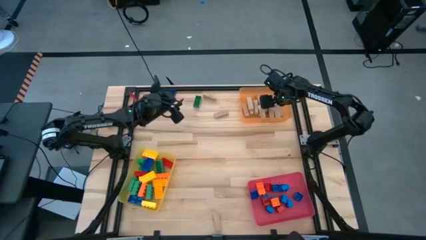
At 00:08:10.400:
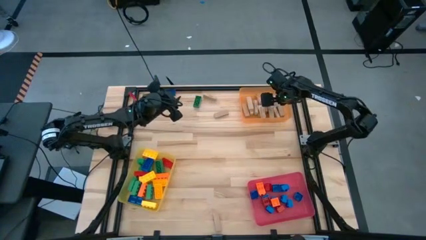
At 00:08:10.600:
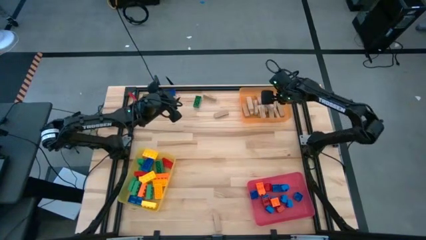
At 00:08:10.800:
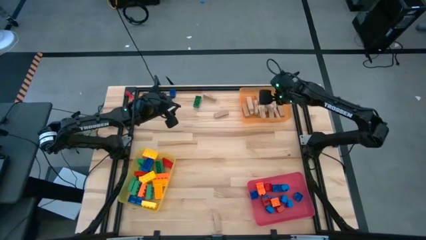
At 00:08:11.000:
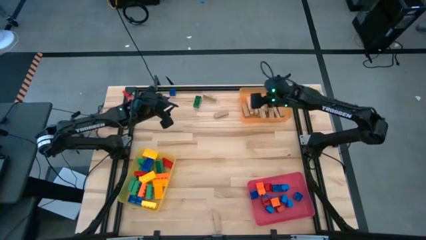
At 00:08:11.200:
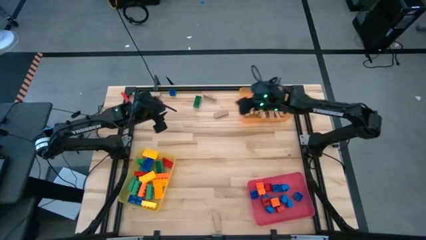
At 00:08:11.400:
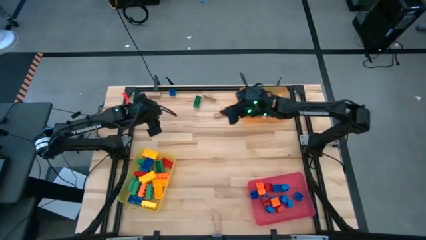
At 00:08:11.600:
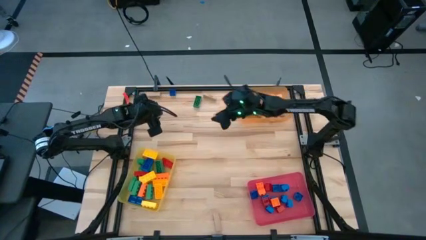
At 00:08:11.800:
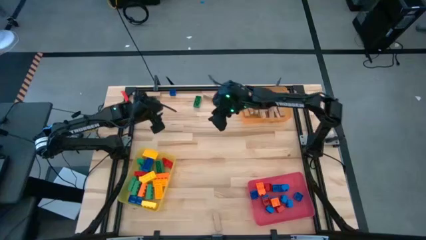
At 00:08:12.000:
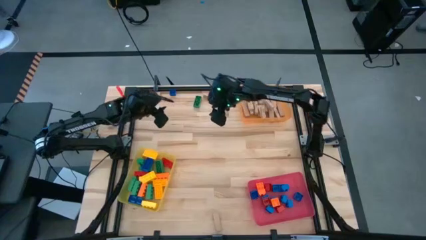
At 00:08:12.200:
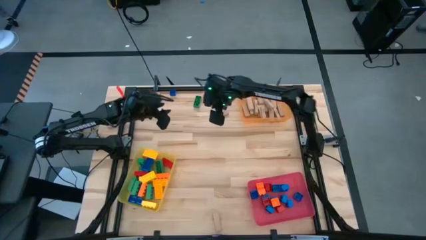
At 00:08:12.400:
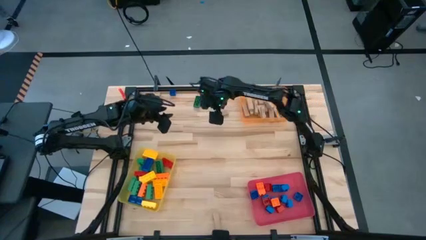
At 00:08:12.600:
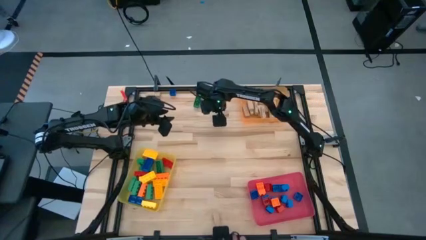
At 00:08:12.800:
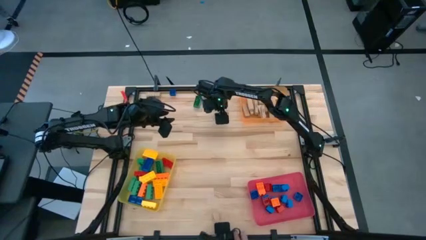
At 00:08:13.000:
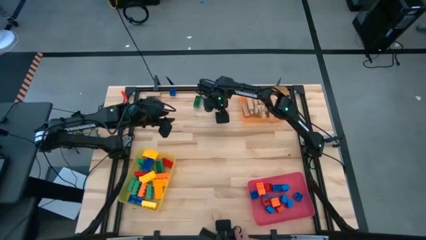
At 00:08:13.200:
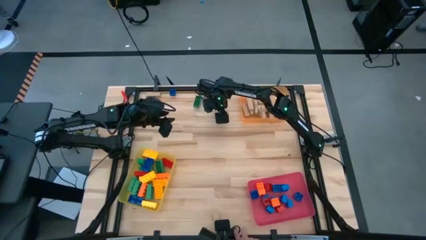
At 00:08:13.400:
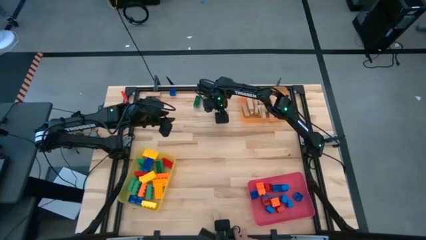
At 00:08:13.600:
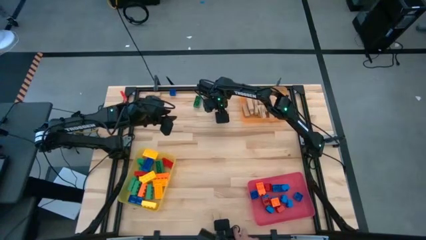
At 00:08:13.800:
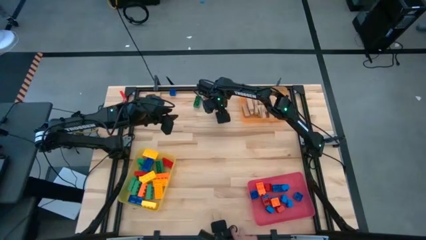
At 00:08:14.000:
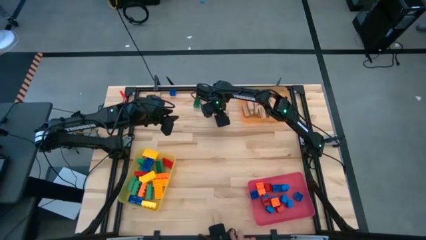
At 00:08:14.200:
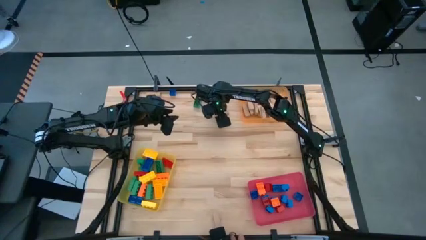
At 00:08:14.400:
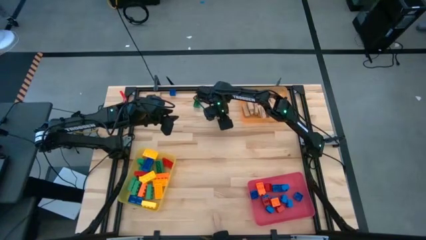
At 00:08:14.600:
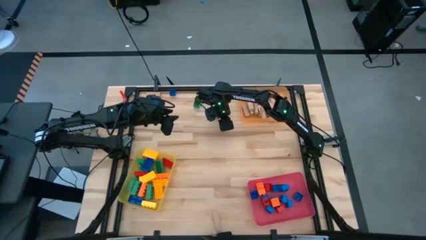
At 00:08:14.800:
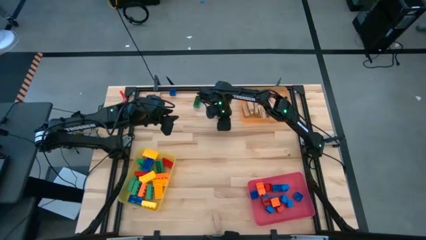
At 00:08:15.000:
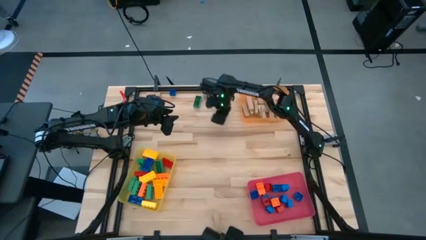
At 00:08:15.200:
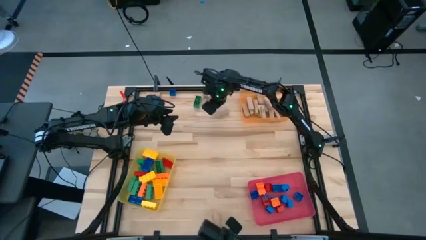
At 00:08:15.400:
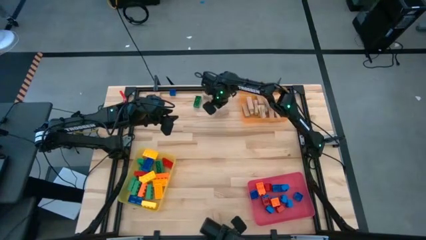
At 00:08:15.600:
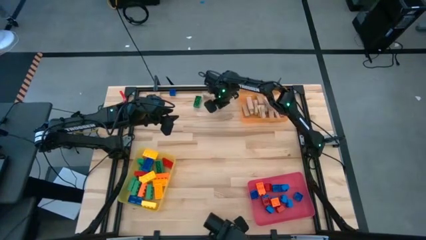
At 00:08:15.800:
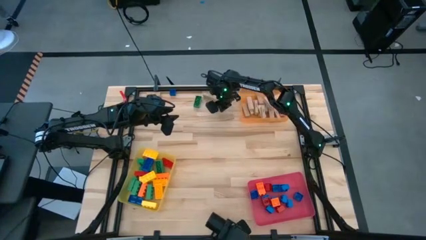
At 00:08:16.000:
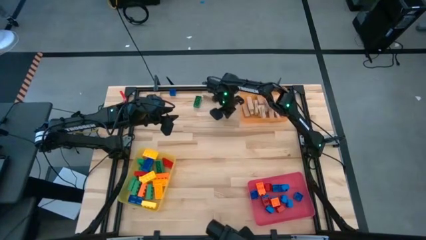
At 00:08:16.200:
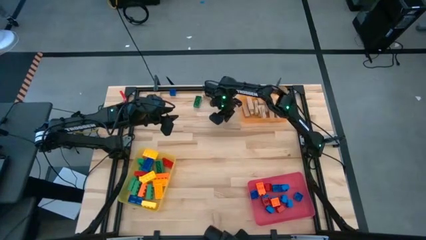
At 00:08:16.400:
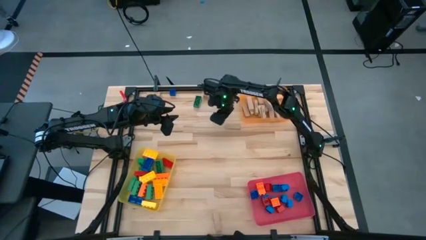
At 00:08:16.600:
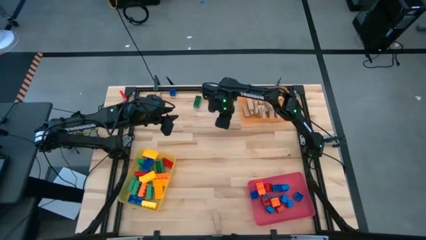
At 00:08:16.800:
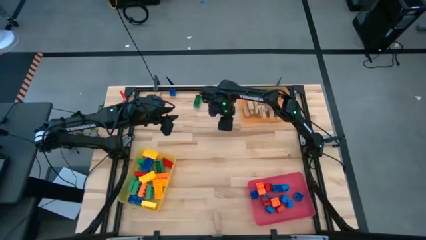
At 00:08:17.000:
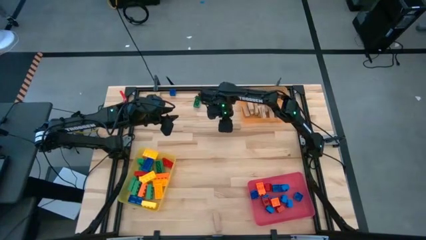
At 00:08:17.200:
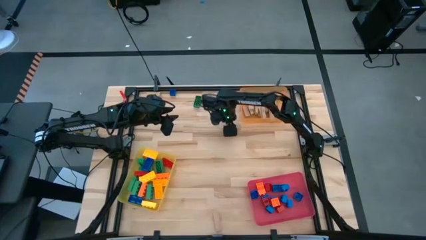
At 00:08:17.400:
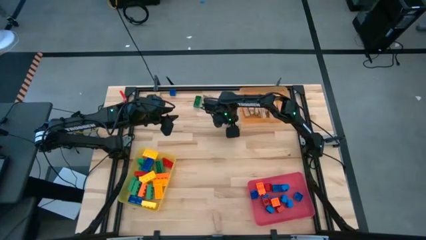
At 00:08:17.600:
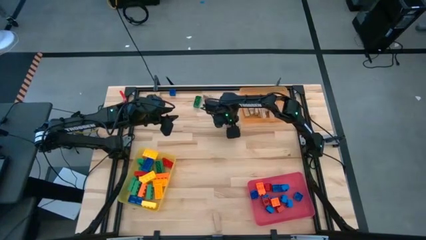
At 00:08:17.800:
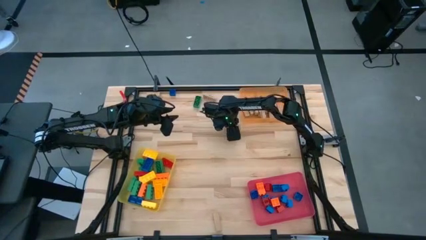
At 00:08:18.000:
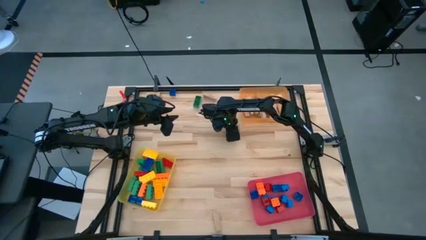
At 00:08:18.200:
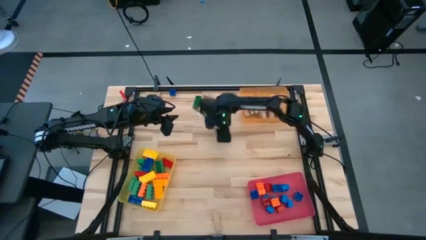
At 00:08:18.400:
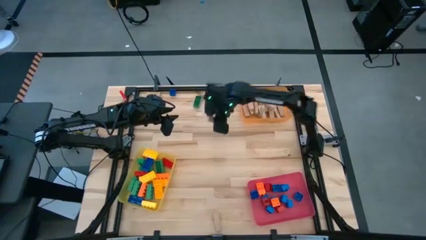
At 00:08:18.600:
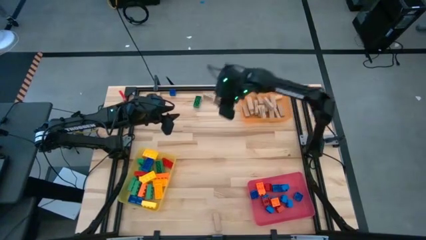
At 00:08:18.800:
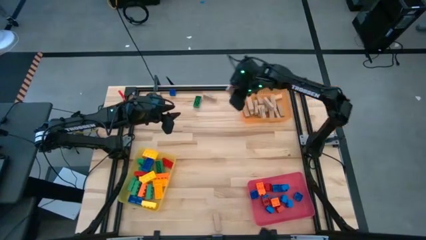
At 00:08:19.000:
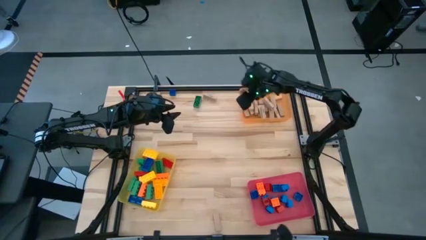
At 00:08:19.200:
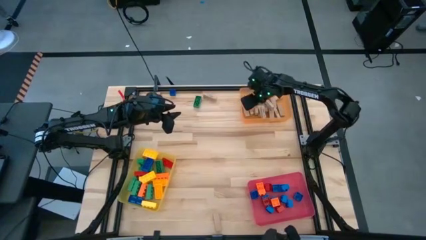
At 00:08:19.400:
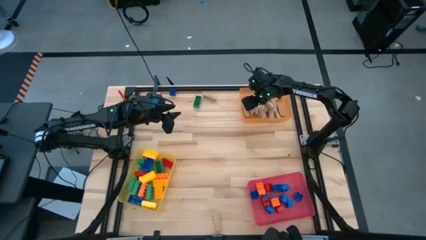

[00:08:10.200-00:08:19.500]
Task: Sort blocks by size
Put the brown block into the orange bin

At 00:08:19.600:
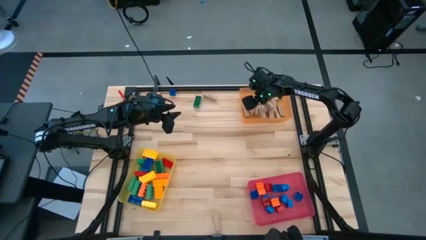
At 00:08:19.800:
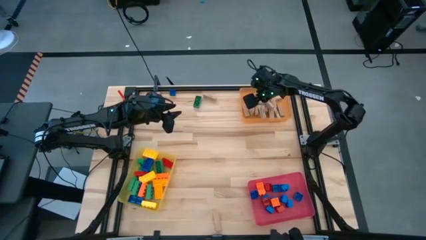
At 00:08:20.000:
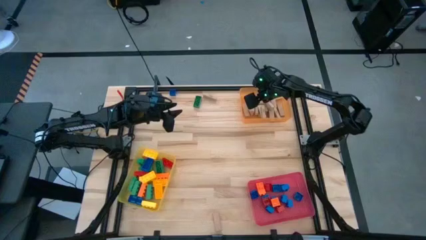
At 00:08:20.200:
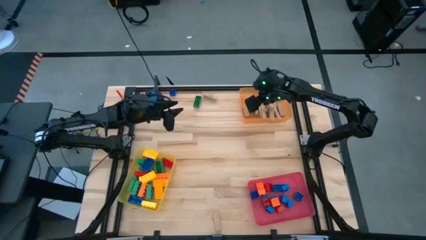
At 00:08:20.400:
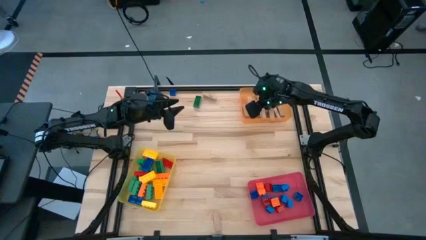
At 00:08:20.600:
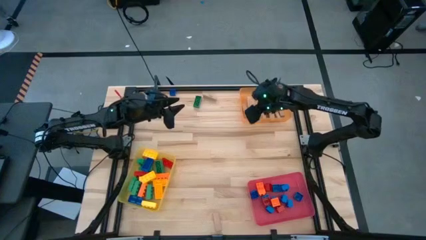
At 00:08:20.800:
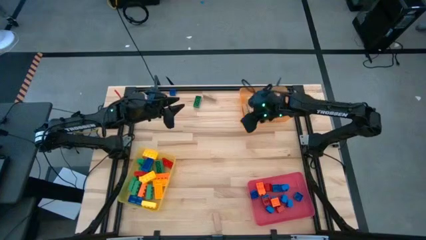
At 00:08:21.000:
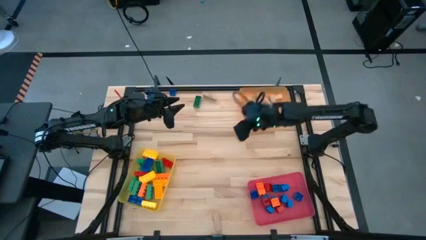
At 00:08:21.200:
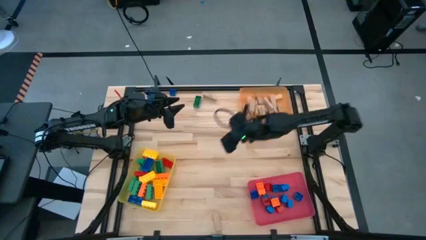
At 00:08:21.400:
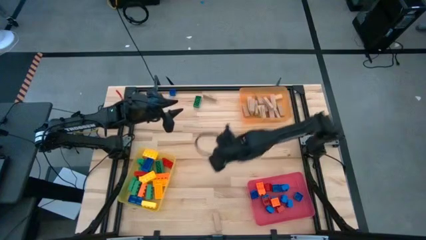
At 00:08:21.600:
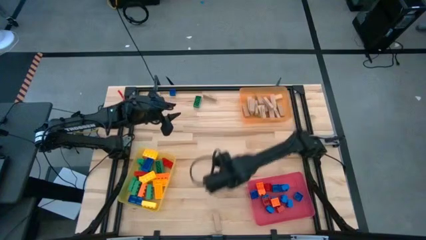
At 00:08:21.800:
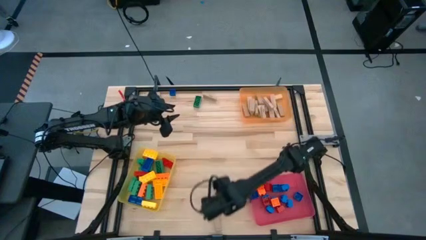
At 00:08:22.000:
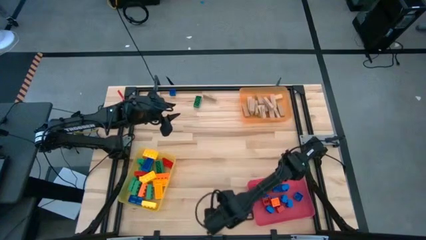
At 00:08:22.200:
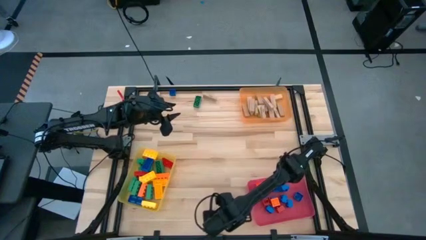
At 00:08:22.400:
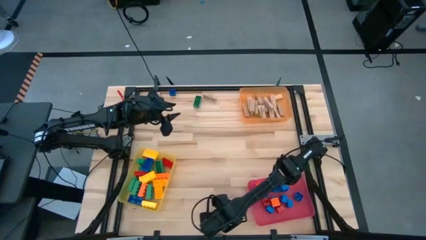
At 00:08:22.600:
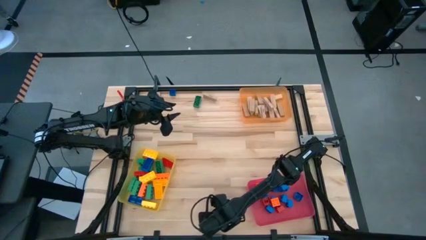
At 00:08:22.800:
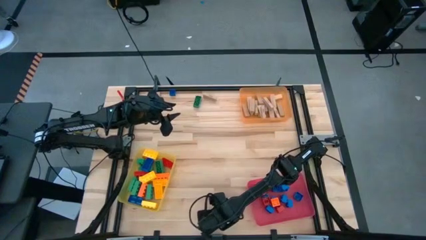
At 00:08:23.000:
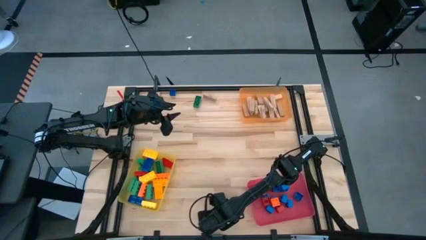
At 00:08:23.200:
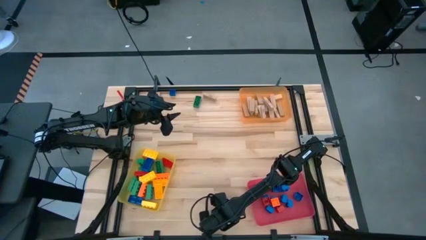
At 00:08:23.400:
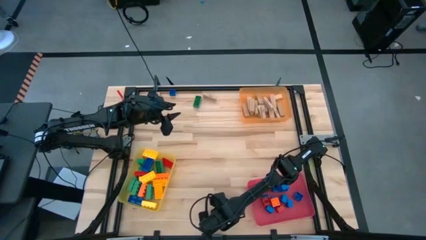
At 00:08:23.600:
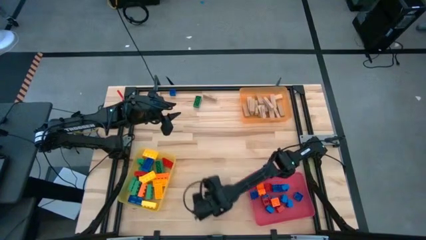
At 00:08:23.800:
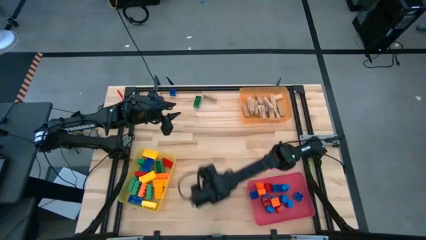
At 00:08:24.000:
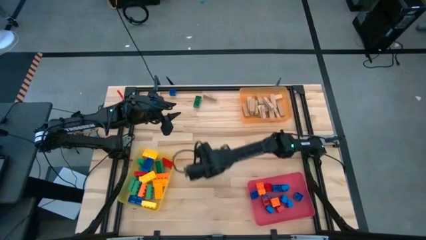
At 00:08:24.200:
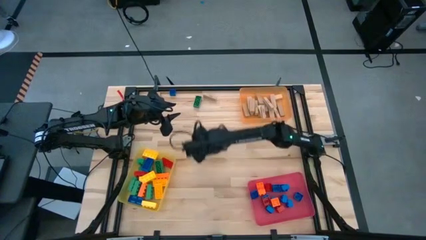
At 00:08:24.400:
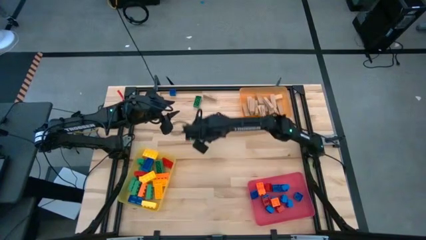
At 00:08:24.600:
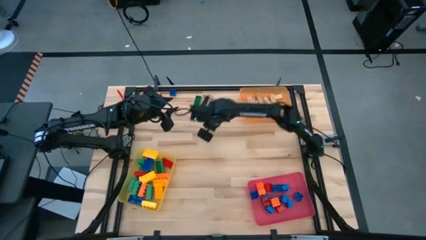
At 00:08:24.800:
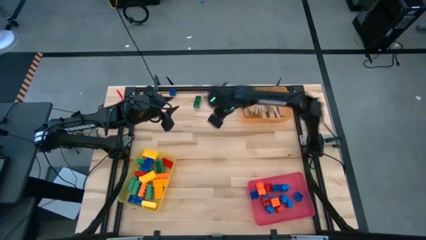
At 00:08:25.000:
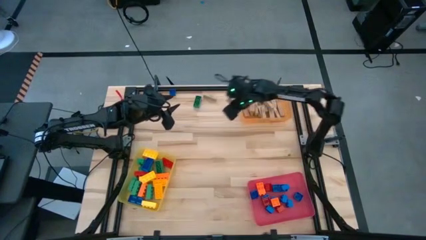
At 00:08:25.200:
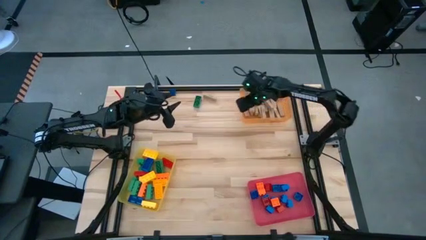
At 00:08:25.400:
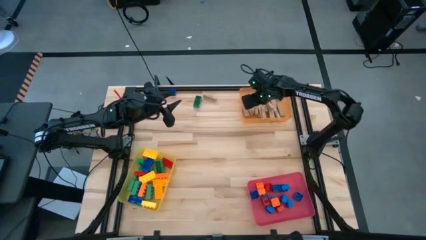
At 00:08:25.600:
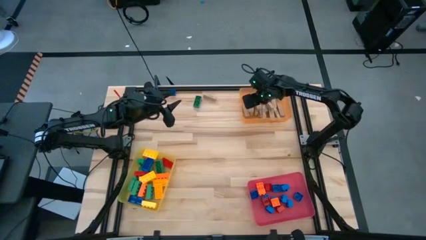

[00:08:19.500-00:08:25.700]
Put the brown block into the orange bin

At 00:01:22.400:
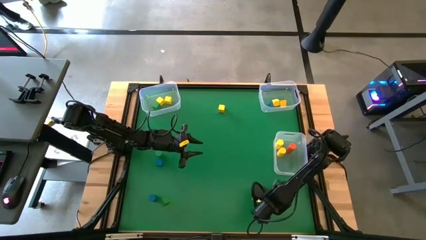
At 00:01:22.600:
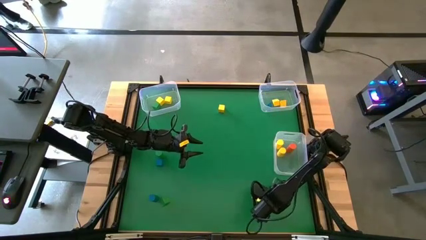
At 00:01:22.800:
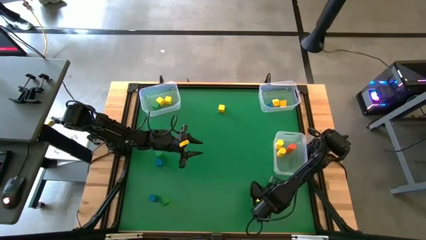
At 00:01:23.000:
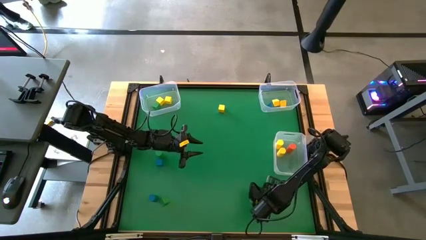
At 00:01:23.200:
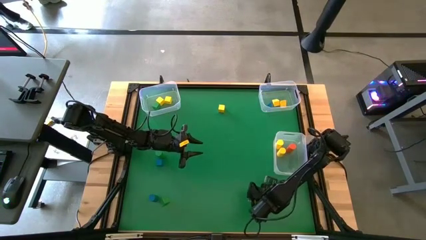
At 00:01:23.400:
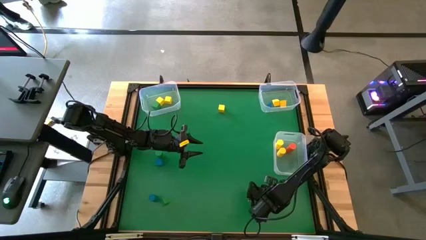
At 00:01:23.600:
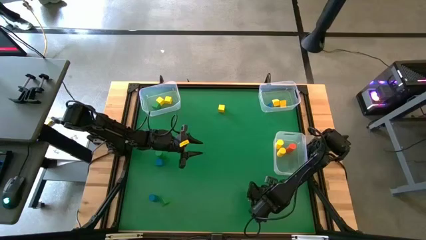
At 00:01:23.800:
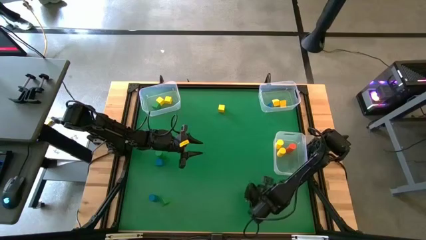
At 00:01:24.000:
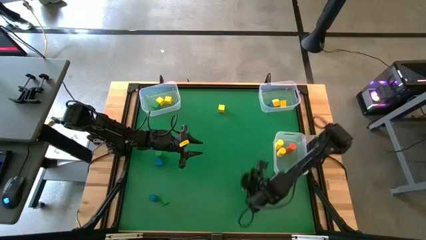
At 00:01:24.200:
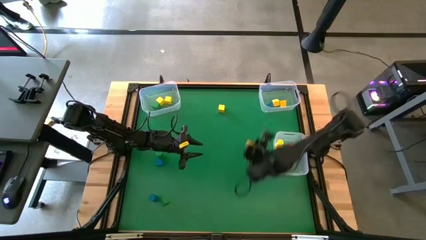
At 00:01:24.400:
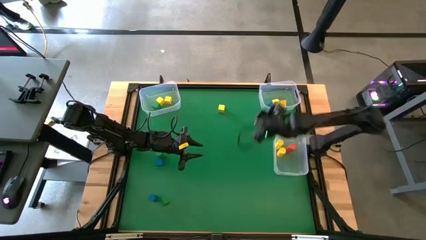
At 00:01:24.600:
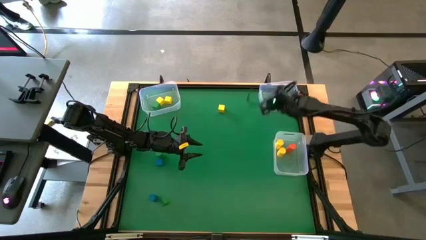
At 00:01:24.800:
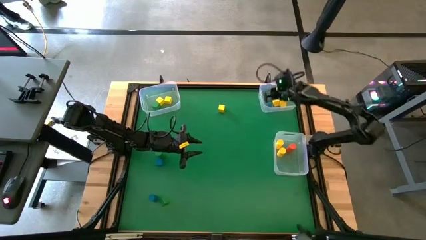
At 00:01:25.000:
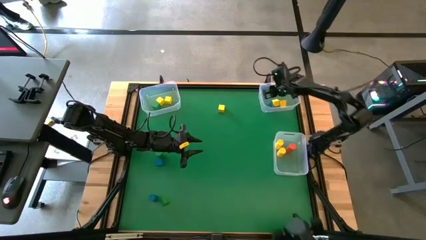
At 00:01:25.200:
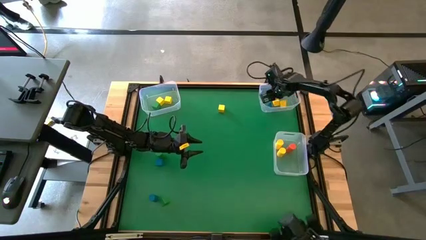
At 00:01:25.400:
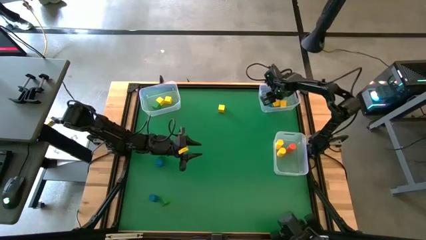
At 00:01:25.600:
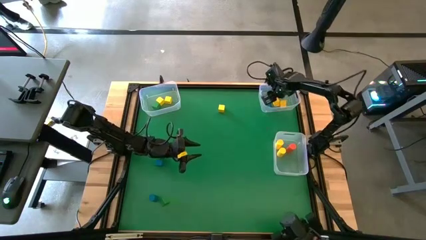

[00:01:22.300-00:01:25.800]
Task: Sort blocks by size
Put the yellow triangular block into the top right transparent bin
